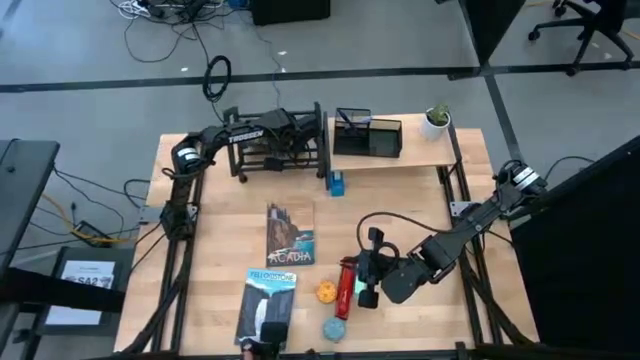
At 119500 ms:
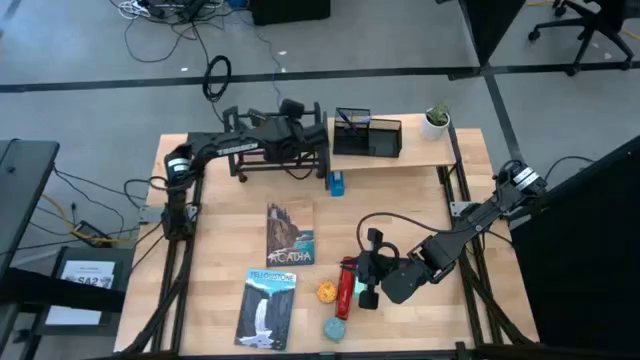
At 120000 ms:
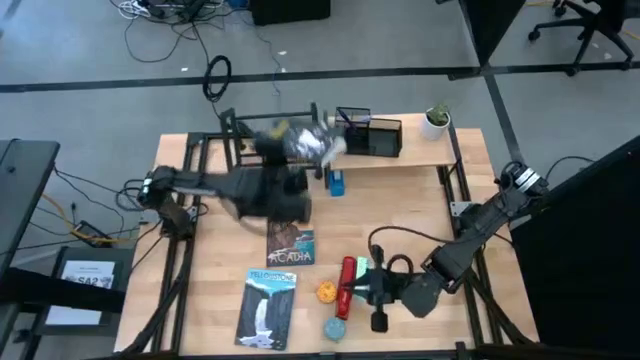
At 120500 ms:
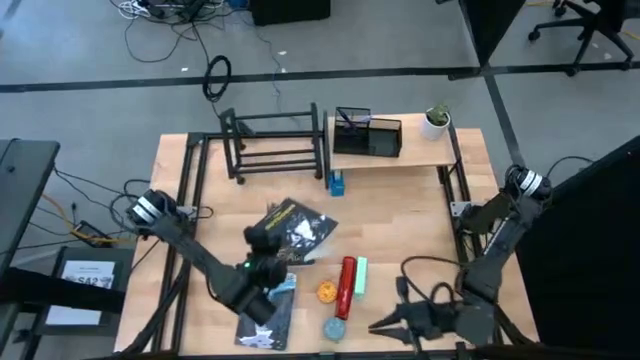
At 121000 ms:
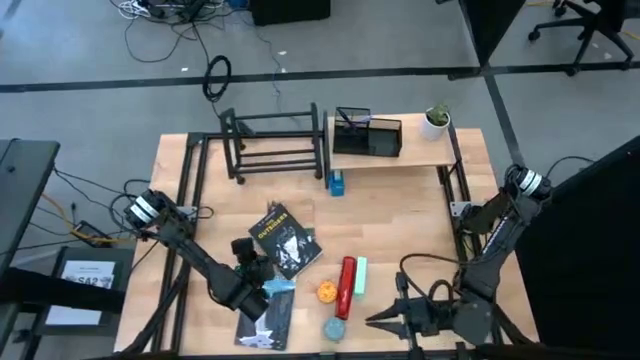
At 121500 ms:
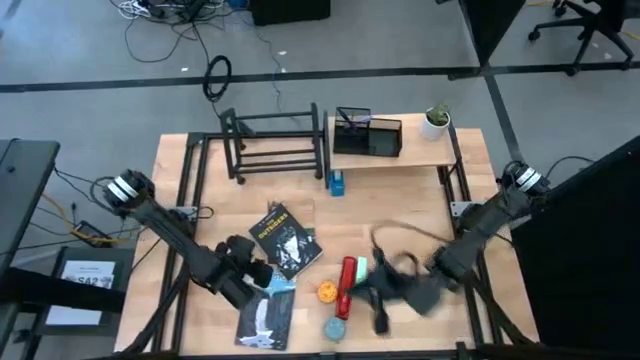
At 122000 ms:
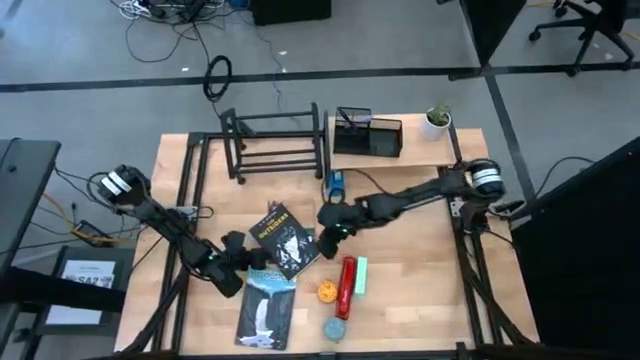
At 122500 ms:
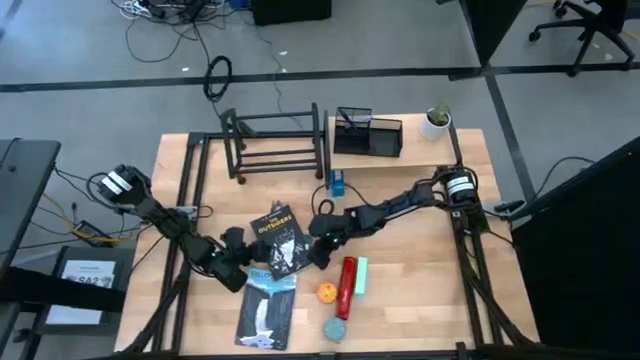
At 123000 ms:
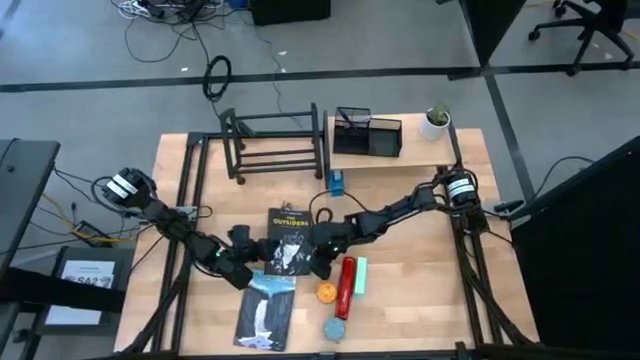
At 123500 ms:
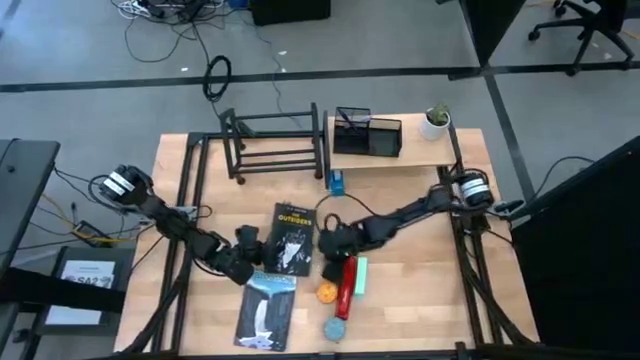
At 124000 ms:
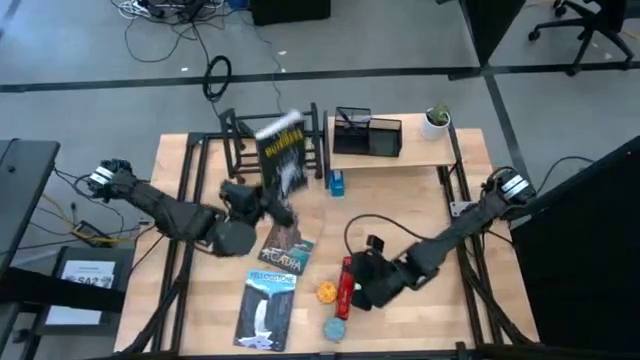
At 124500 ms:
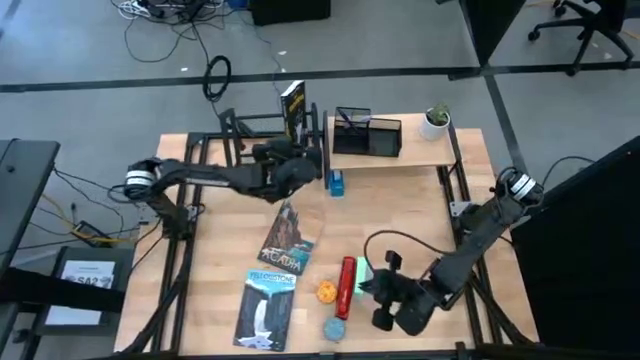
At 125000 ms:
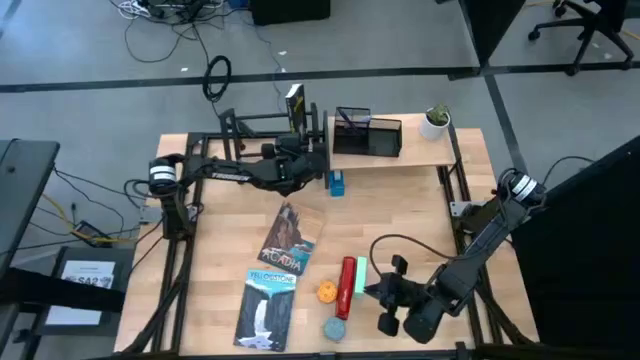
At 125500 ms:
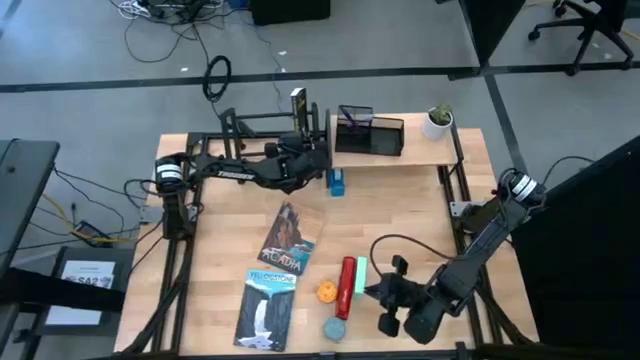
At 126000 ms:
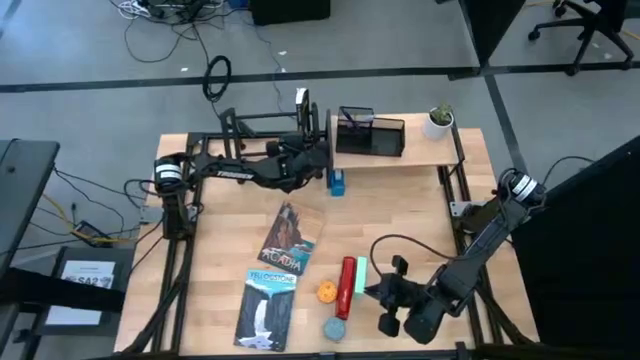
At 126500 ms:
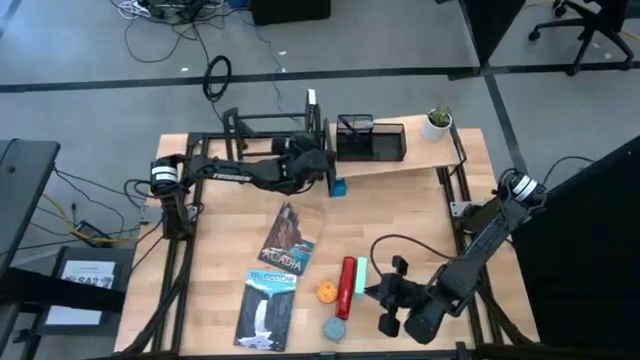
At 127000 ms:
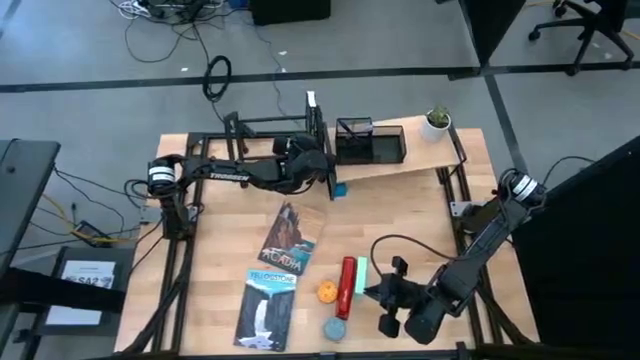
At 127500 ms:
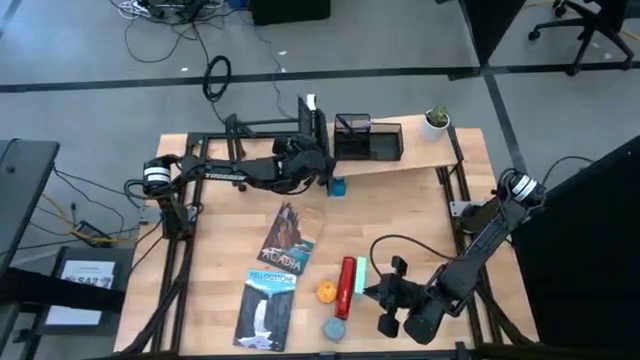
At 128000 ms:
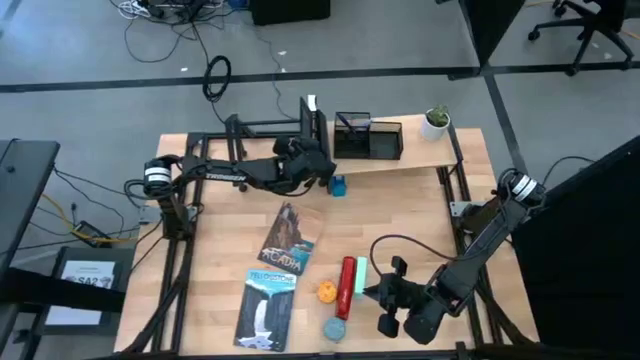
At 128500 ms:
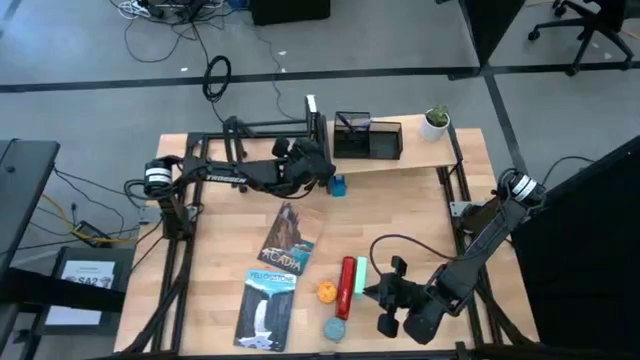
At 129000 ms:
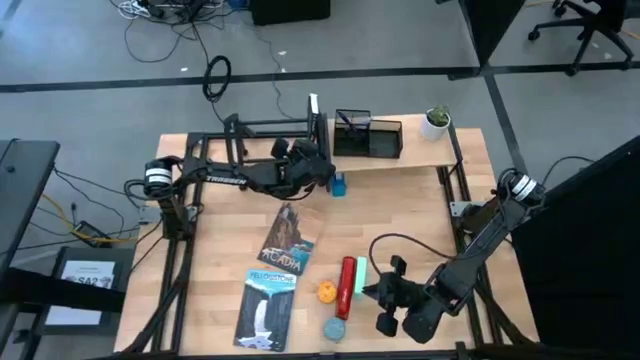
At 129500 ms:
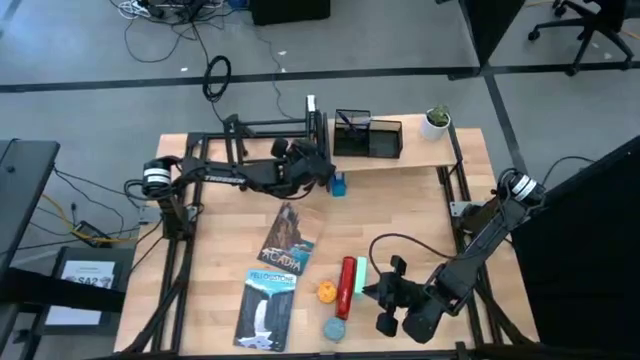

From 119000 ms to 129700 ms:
Task: Stock shelves
Put the black book on the book shelf

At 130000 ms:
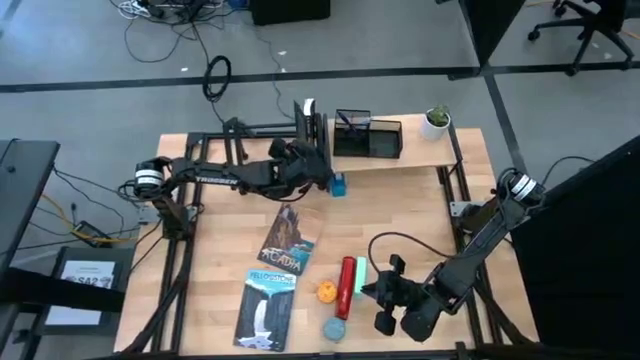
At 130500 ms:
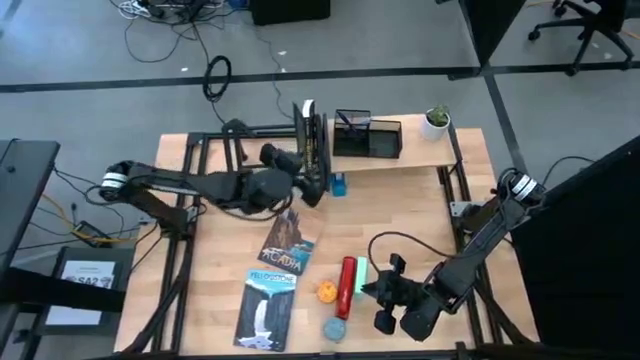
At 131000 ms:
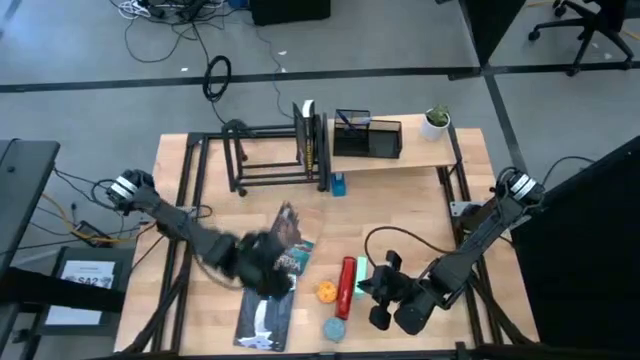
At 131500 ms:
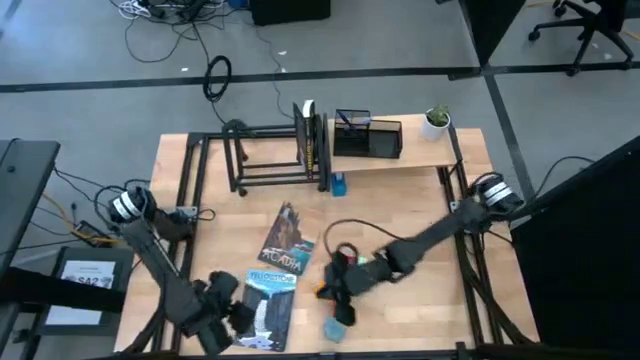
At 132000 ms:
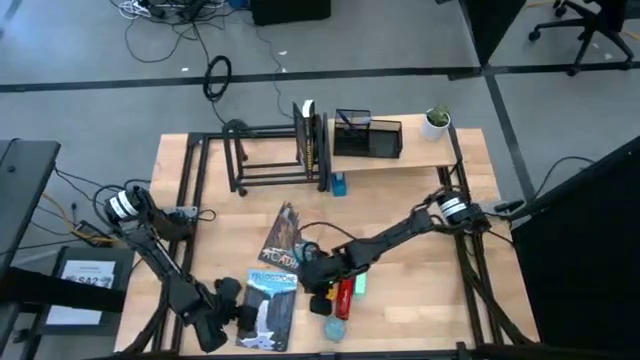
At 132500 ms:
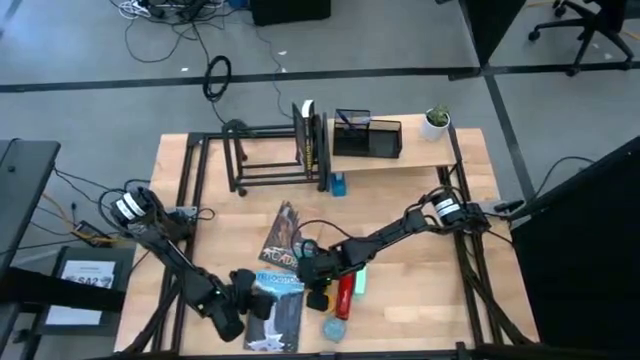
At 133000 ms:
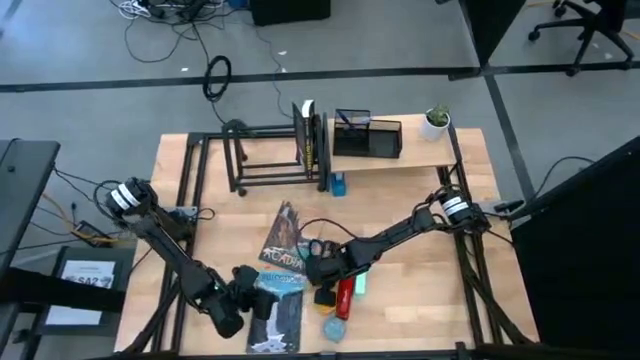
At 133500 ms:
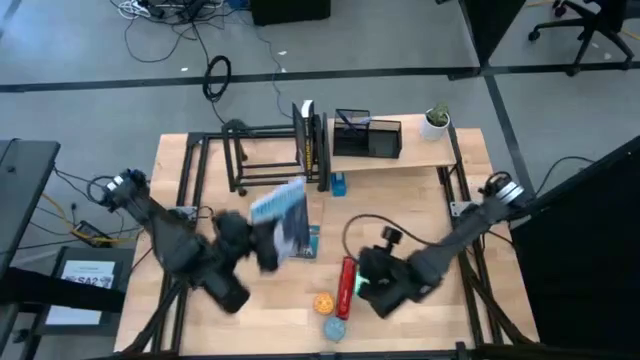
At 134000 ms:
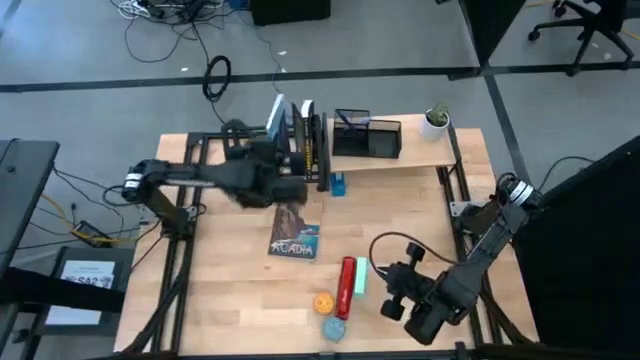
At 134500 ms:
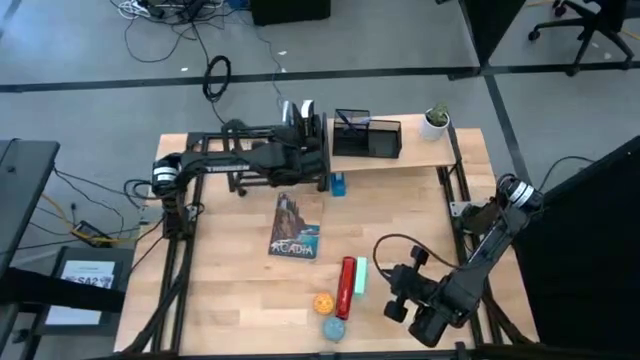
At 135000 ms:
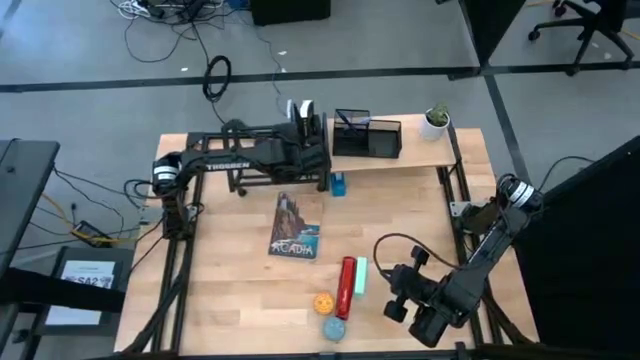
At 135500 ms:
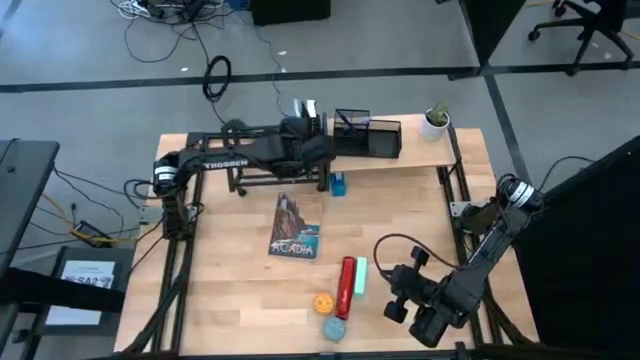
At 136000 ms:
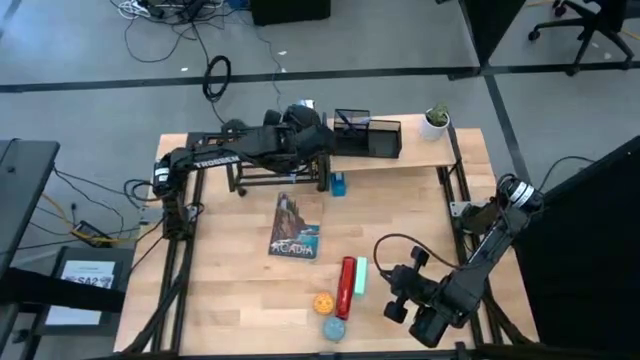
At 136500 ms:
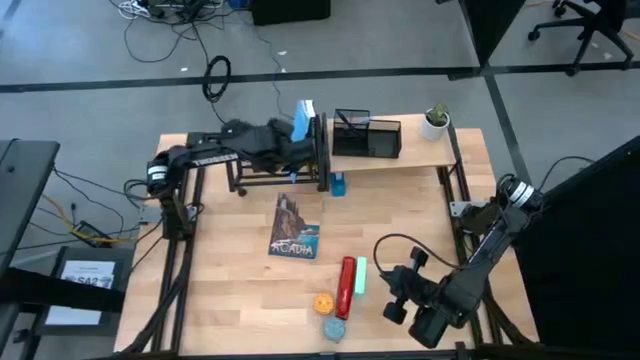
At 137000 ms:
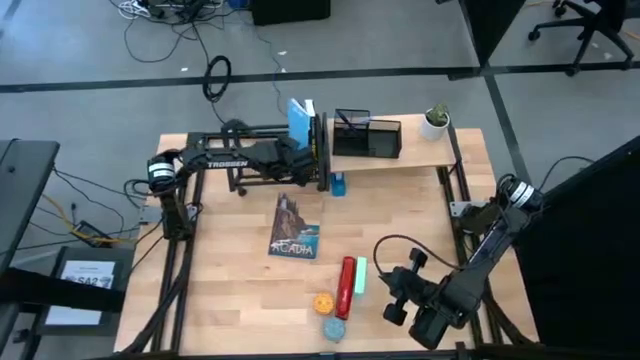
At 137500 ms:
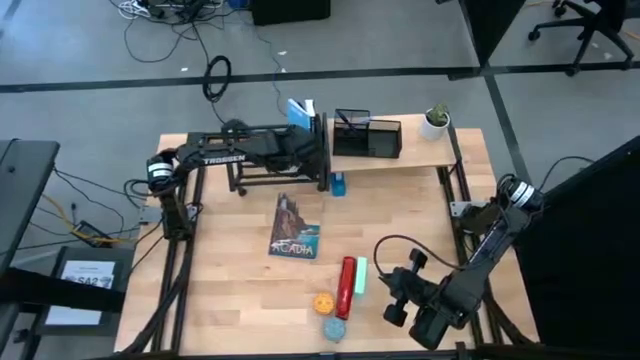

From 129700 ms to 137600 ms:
Put the light blue book on the book shelf

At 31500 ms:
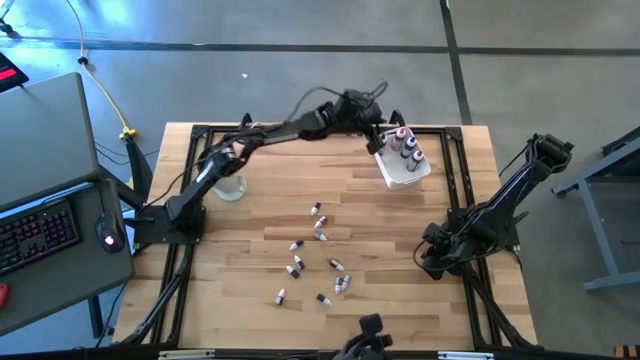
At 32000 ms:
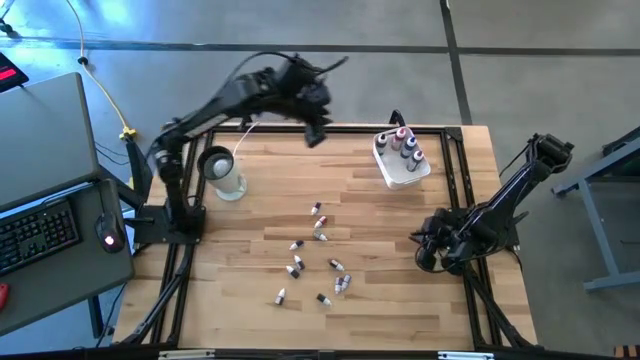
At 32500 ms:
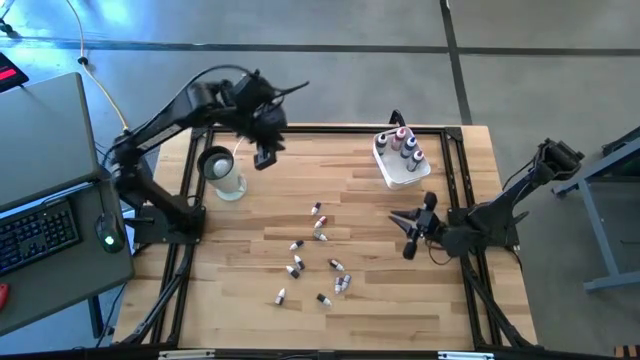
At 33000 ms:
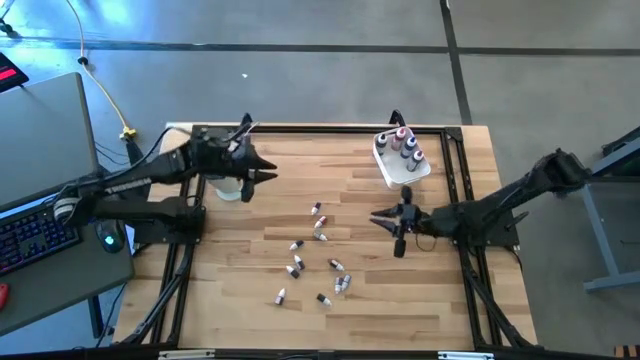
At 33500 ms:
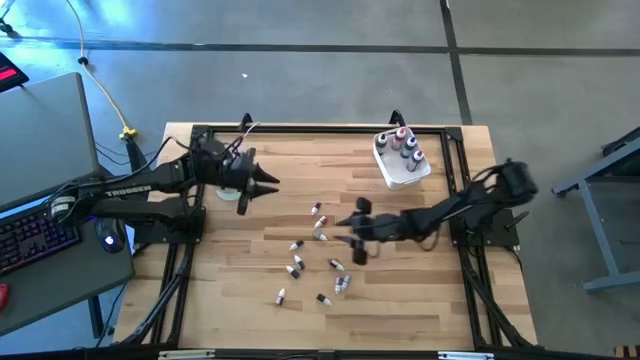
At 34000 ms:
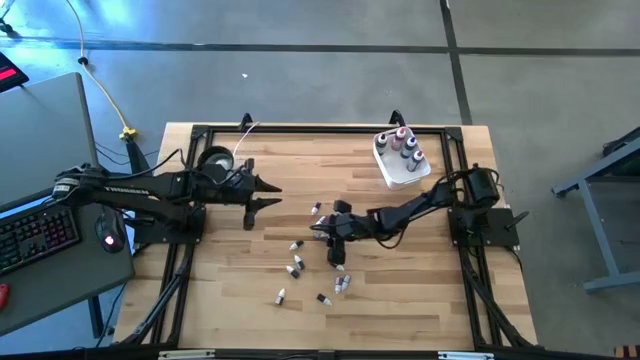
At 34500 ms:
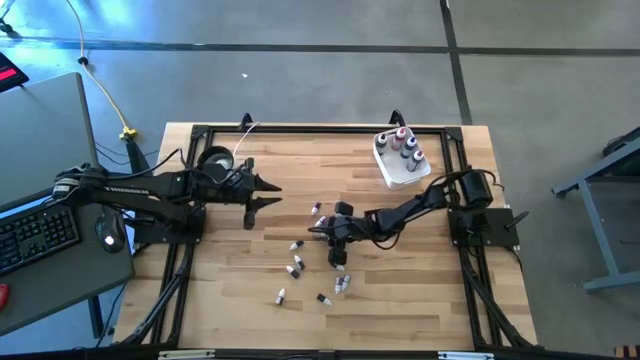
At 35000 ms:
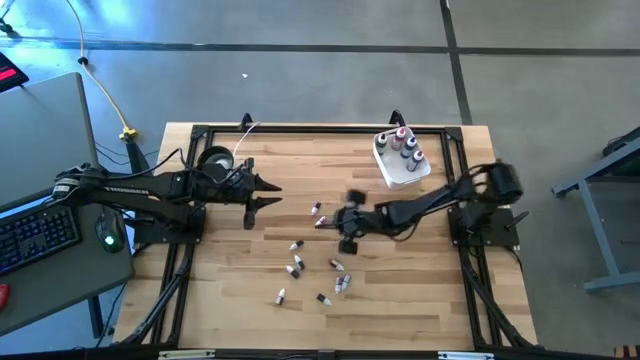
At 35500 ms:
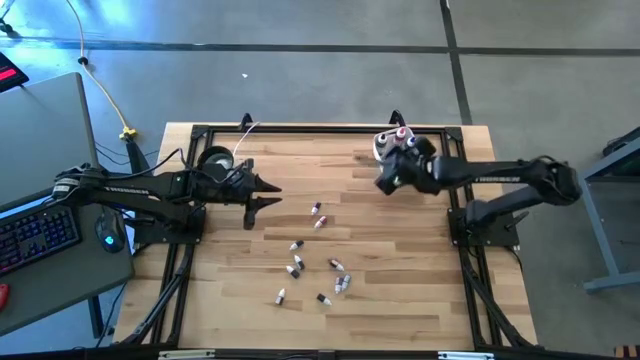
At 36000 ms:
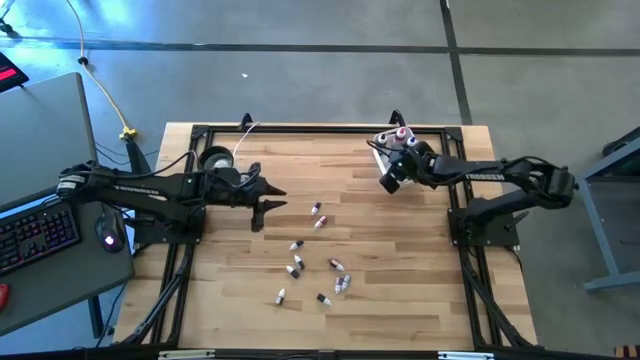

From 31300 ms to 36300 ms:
Task: Pick & Place food coloring
Put the top small green food coloring bottle into the white bin
